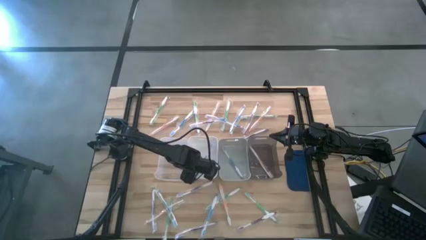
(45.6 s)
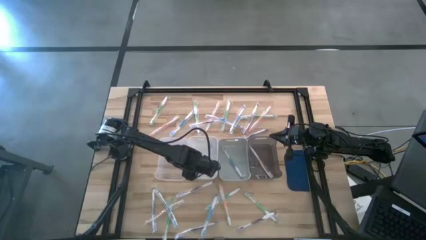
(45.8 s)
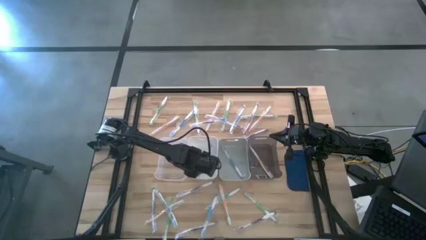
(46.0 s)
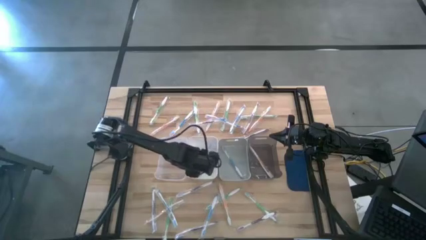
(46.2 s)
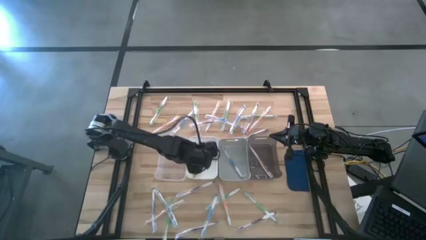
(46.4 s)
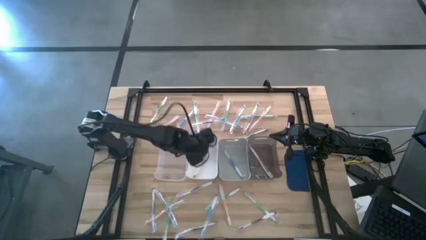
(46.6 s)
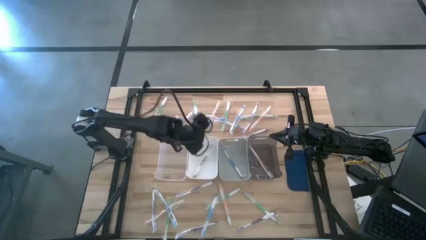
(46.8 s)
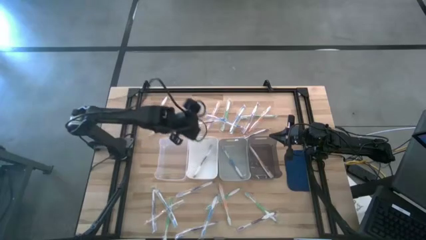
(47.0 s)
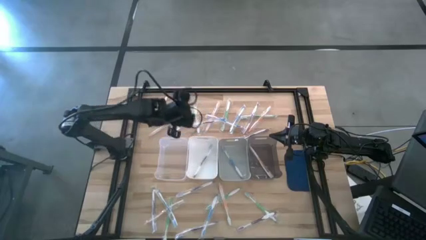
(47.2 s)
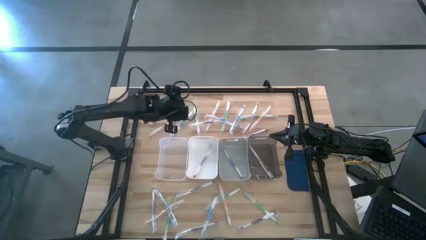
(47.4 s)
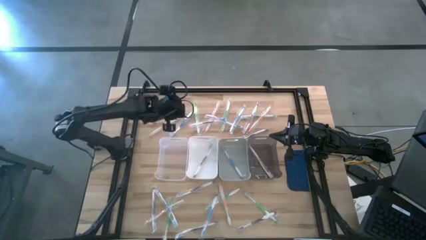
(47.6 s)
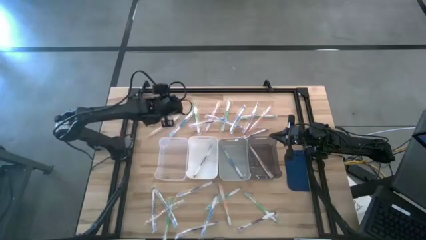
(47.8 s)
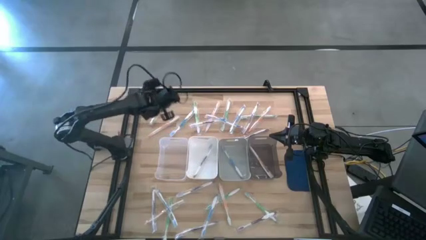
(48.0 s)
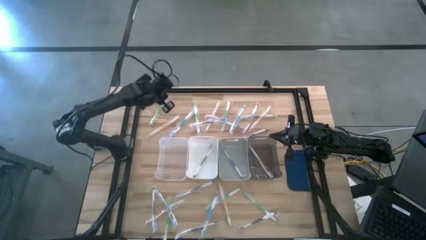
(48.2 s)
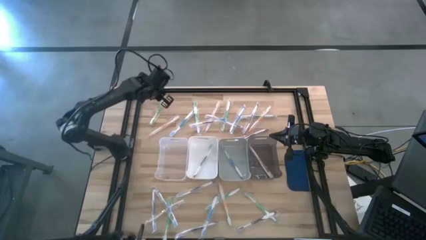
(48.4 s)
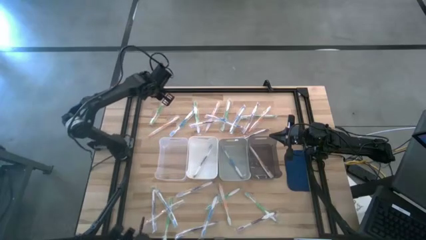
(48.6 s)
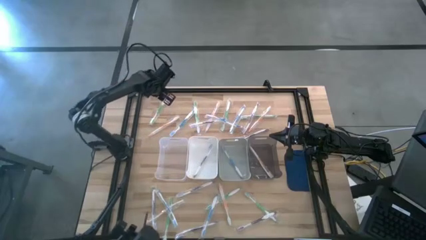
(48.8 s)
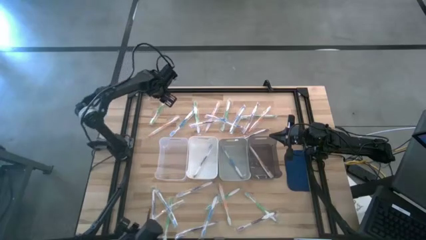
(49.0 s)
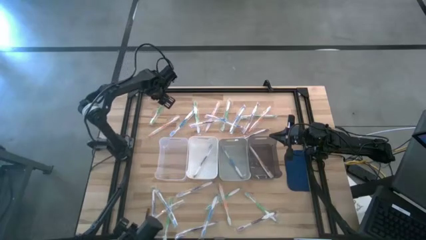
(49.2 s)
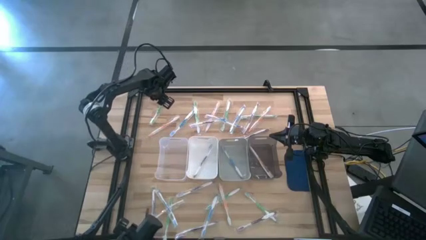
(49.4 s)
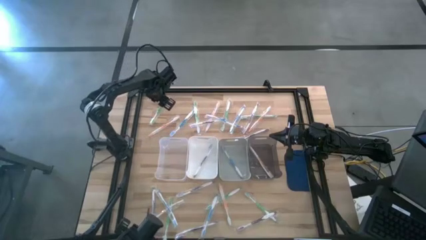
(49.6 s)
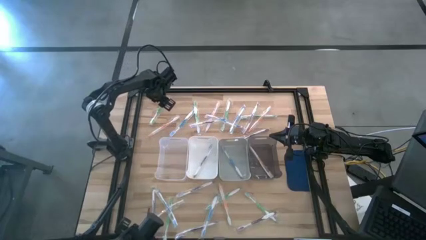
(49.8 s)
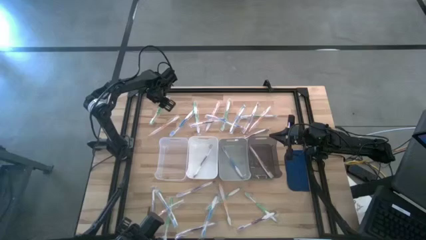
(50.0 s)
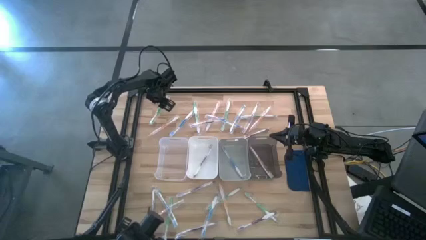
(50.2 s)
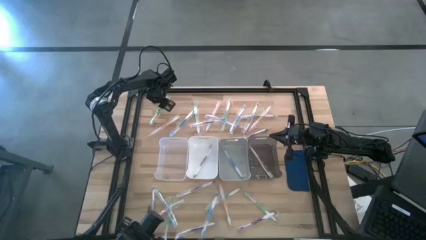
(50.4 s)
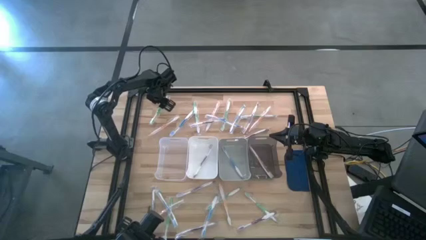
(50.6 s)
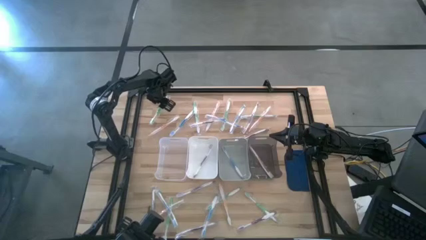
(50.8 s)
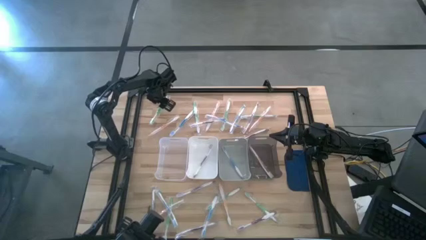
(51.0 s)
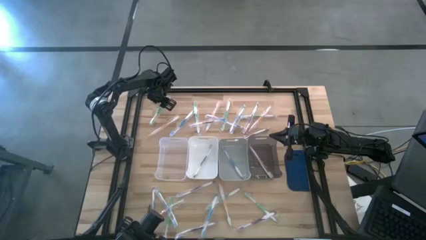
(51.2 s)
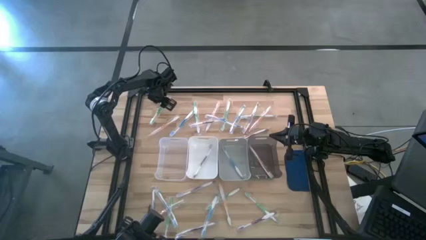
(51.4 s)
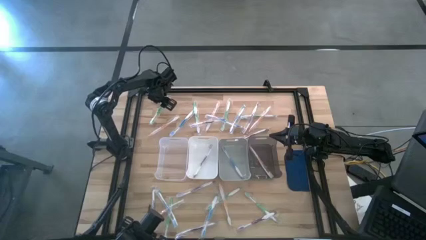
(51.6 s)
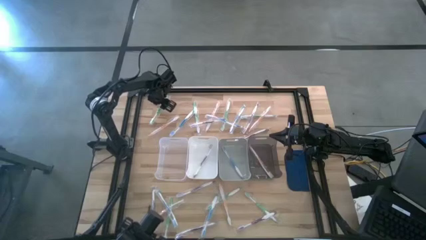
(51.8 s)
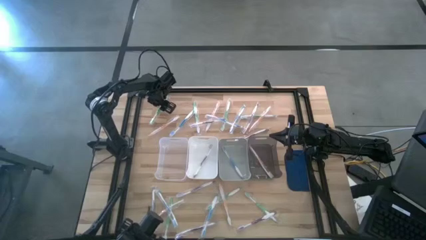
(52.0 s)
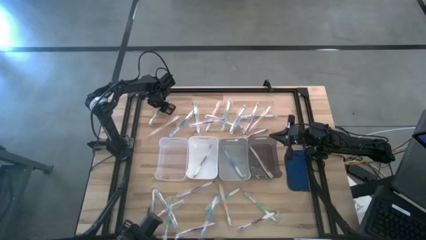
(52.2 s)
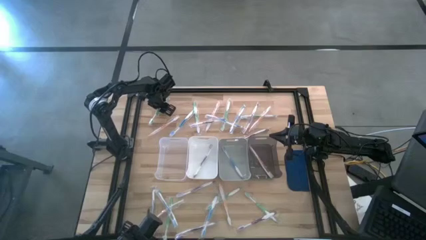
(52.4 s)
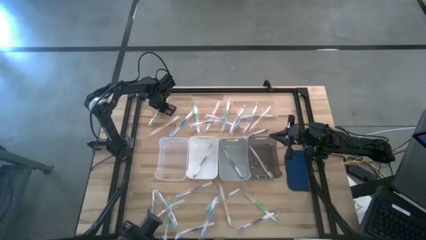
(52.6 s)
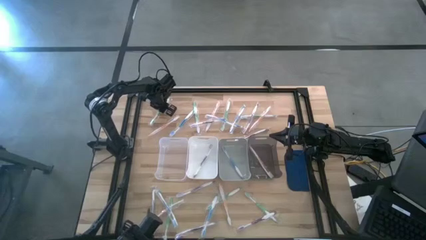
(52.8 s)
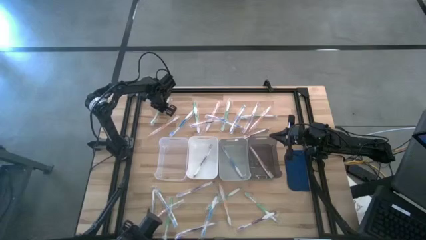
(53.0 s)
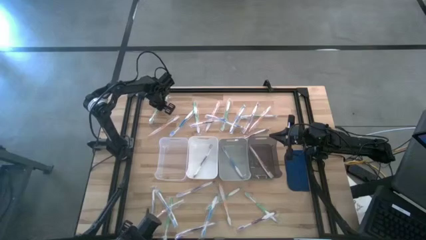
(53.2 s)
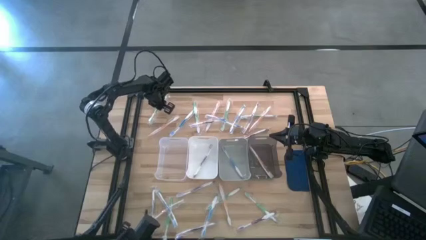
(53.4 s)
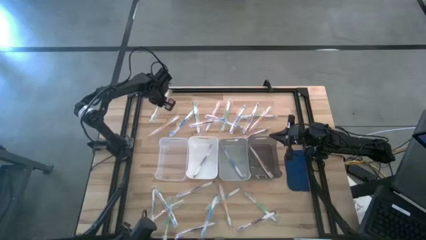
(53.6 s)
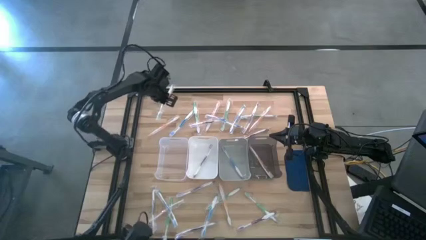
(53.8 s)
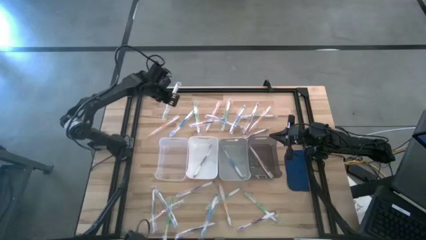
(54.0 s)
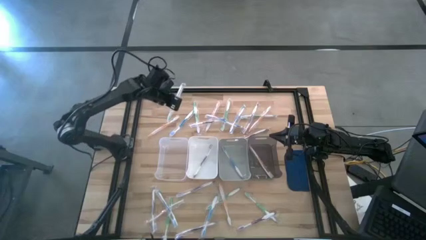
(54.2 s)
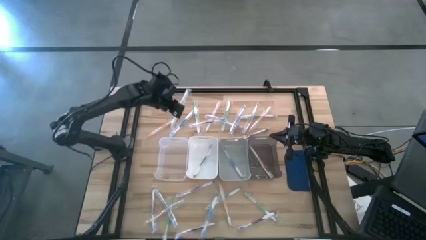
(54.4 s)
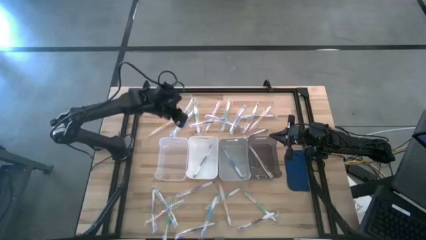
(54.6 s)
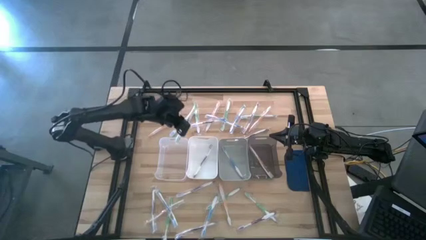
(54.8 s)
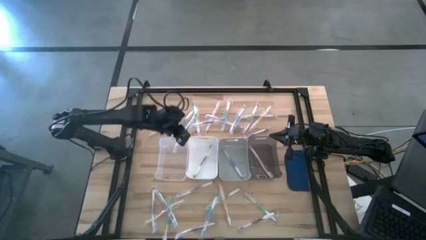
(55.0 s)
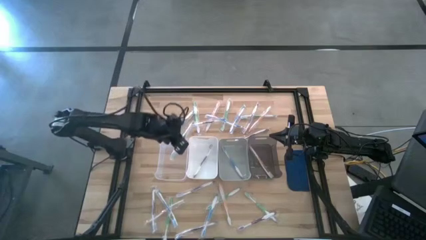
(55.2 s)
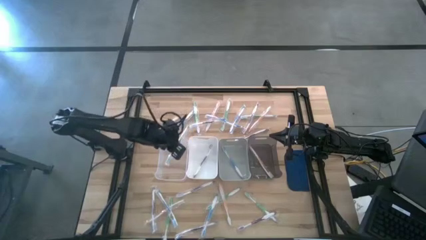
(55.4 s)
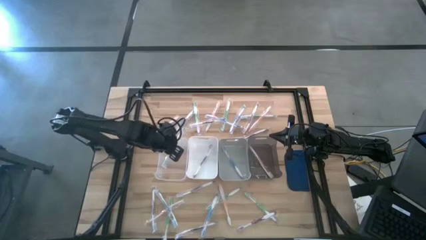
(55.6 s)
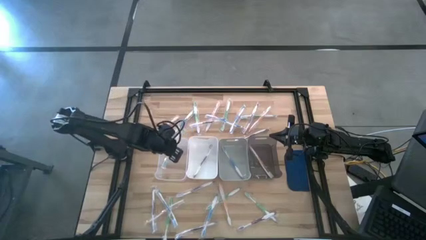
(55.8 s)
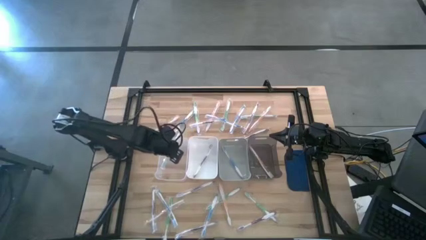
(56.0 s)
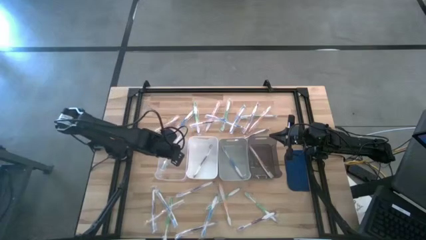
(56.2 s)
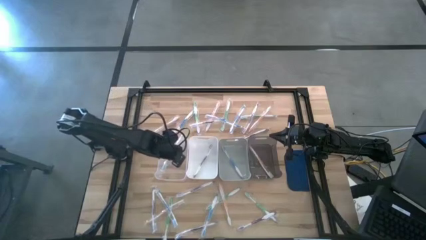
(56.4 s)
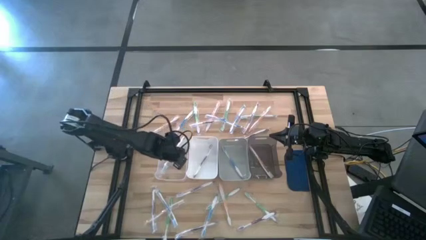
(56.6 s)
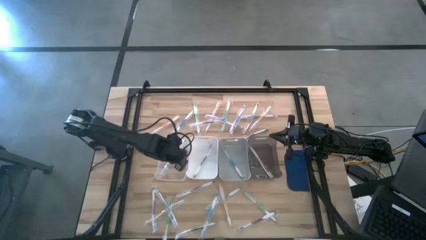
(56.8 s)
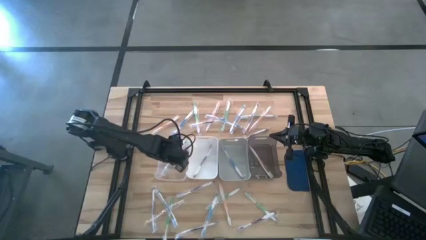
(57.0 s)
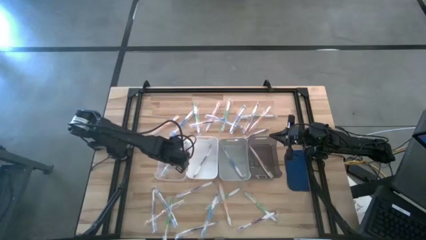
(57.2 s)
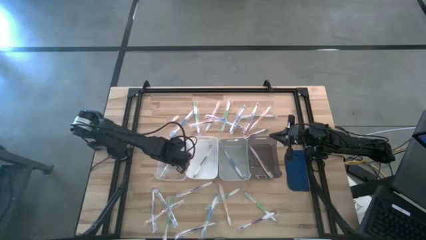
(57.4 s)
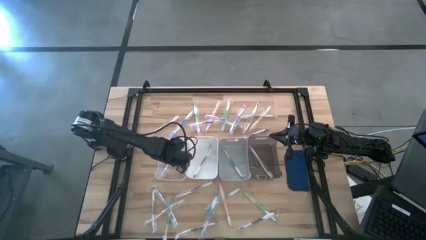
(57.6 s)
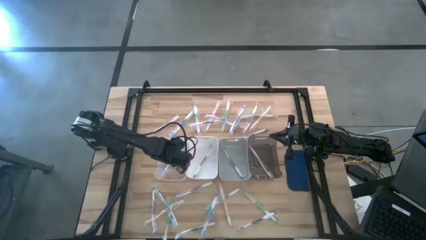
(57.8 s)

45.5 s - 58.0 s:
Task: Pick & Place Toothbrushes
Put the green toothbrush into the transparent bin
